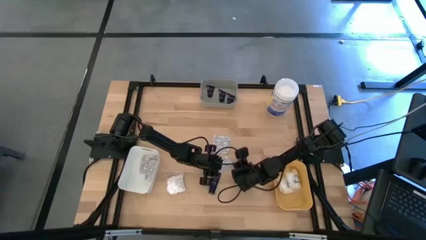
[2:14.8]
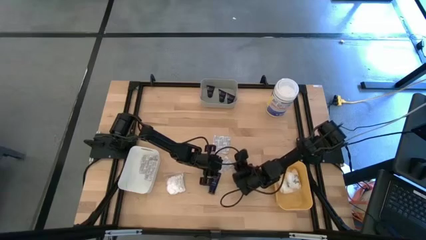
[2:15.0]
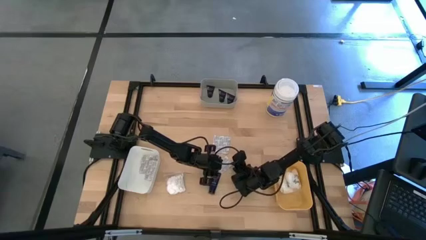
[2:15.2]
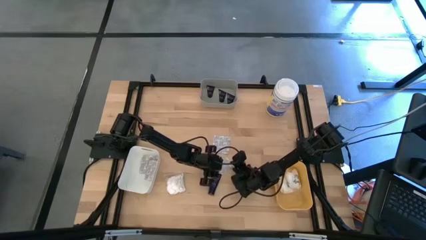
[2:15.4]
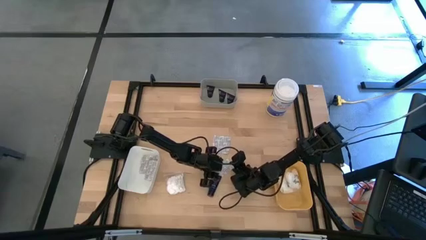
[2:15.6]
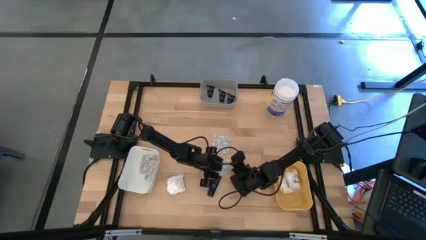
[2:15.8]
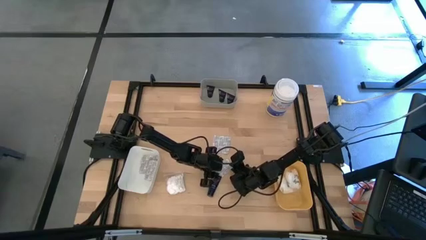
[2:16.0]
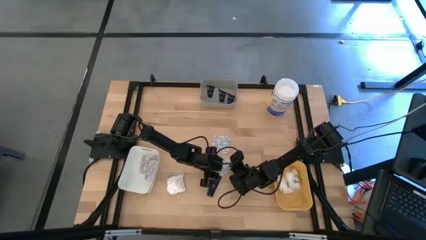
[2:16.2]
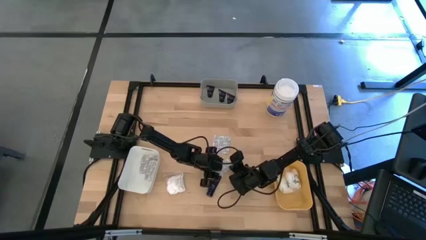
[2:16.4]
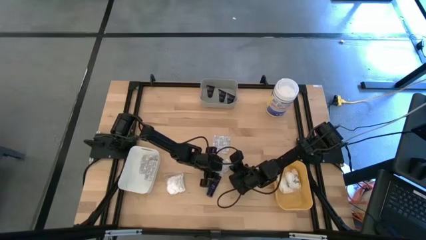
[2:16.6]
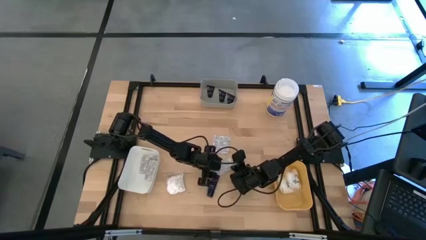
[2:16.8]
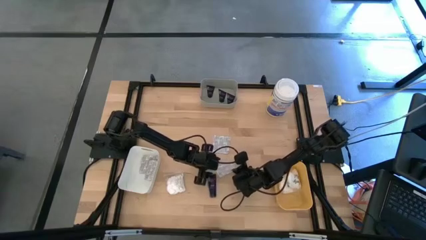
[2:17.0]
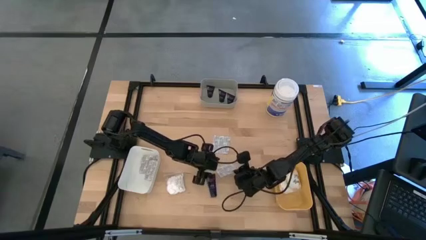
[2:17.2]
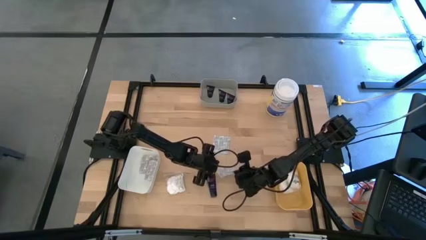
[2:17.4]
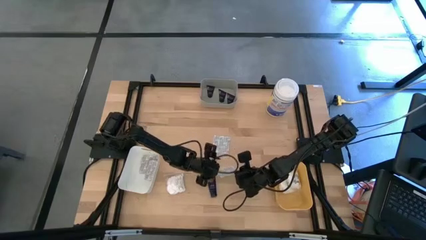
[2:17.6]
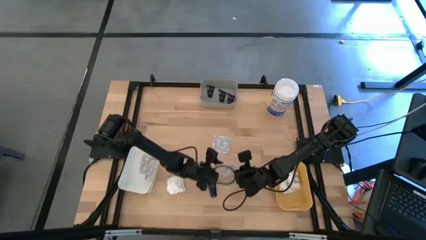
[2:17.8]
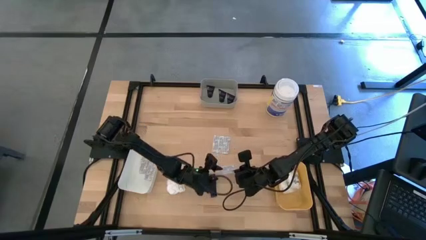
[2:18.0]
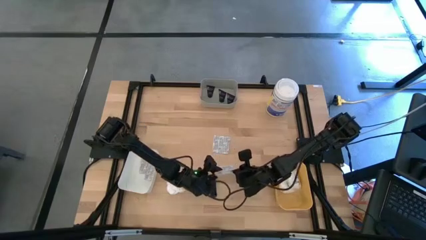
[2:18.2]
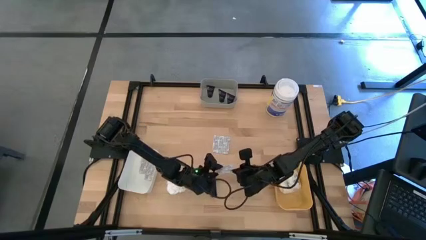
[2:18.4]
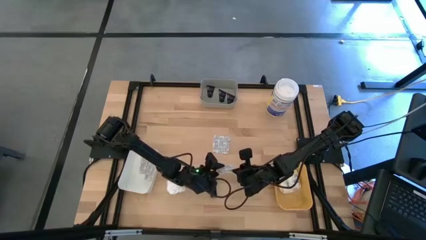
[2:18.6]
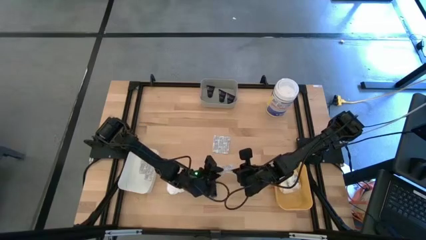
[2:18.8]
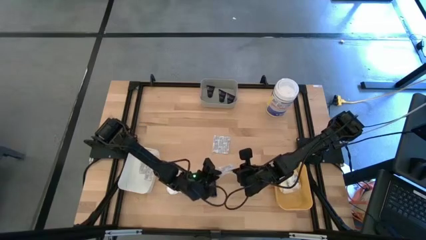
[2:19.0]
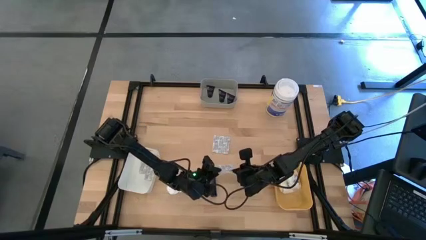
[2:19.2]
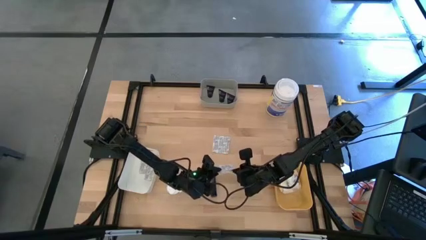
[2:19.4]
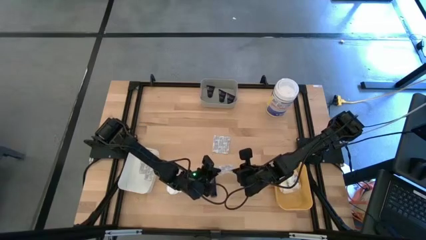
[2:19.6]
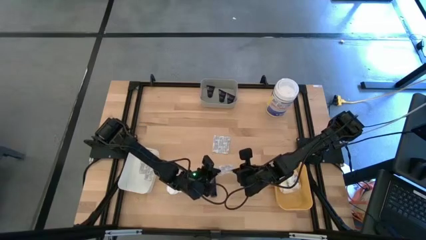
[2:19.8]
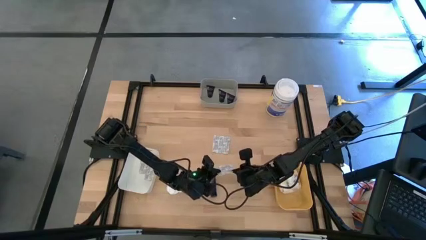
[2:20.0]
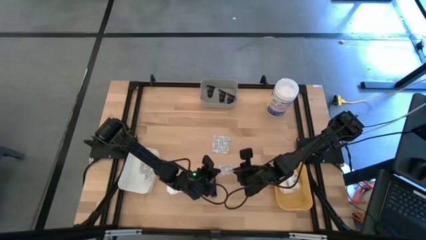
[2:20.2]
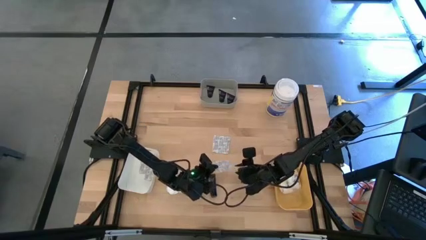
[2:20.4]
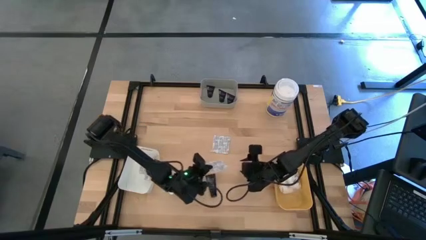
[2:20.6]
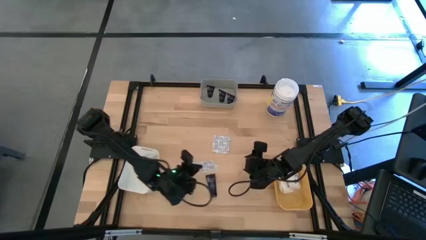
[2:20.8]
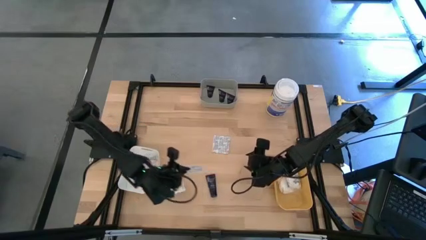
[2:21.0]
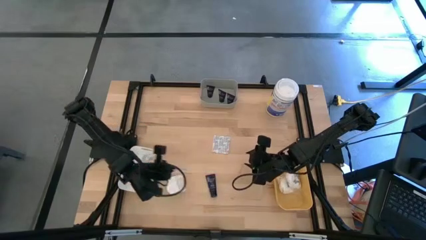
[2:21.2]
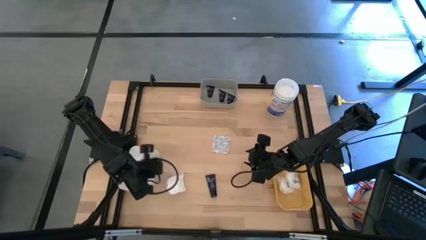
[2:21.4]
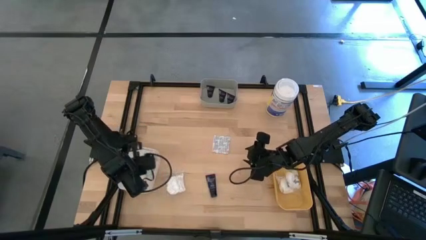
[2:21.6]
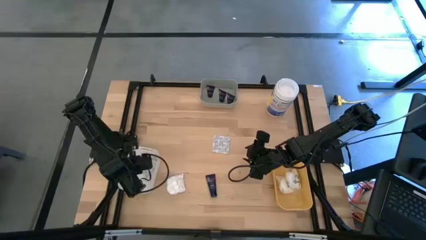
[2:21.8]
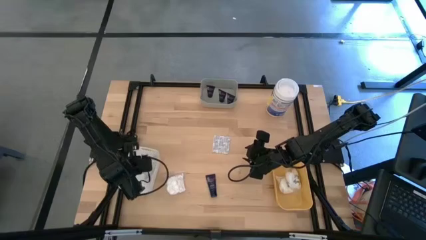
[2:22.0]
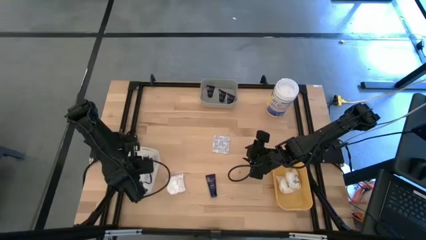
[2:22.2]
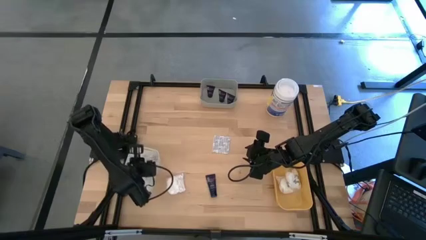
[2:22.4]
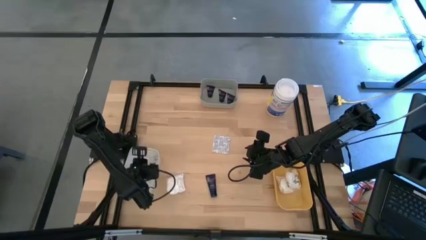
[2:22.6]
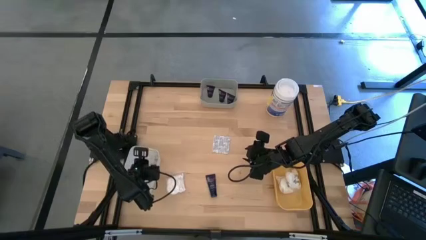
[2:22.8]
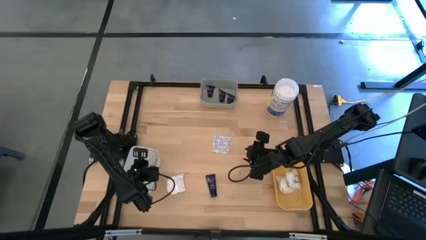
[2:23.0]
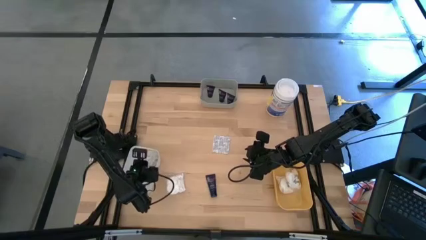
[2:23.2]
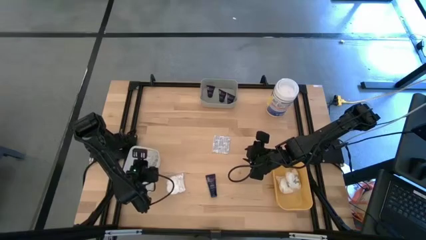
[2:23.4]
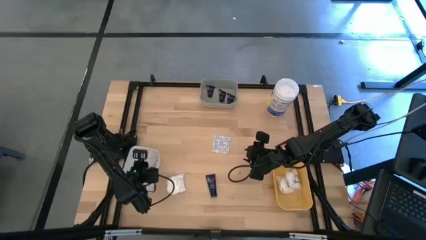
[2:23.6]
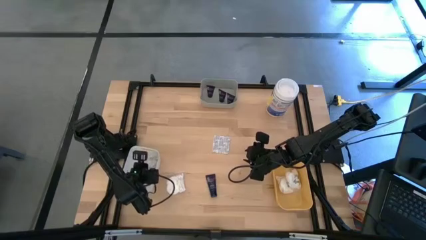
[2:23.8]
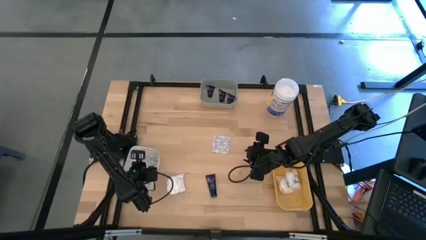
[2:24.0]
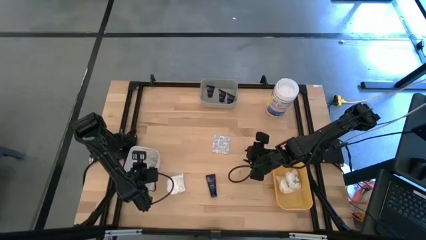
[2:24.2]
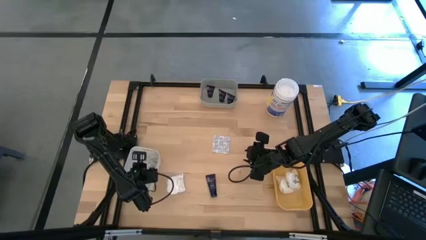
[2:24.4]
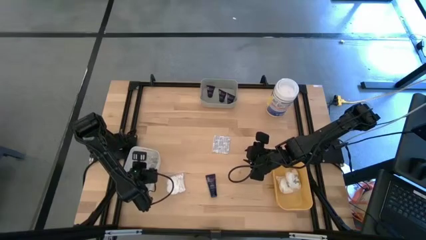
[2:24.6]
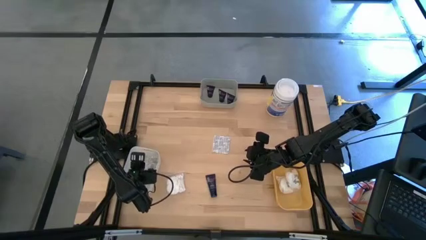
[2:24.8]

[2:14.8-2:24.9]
Task: Pick & Place Travel size toiletries
Put the bandage into the white bin

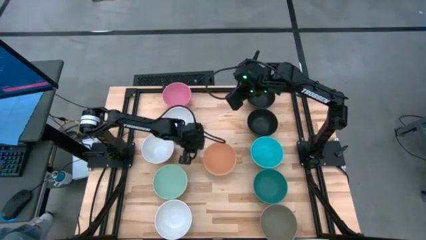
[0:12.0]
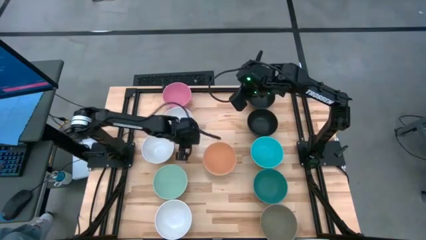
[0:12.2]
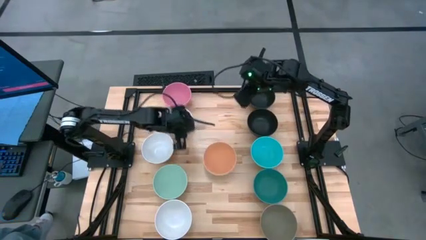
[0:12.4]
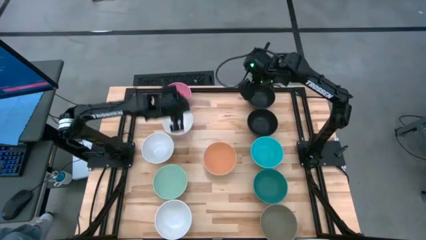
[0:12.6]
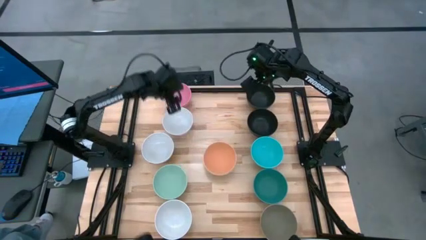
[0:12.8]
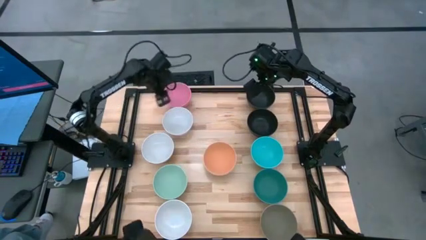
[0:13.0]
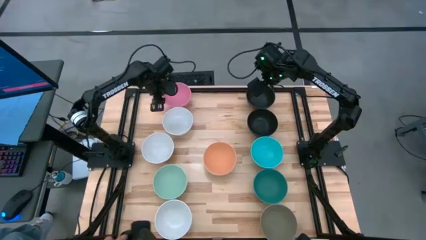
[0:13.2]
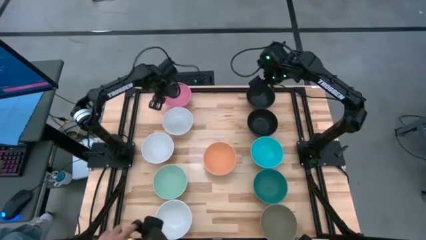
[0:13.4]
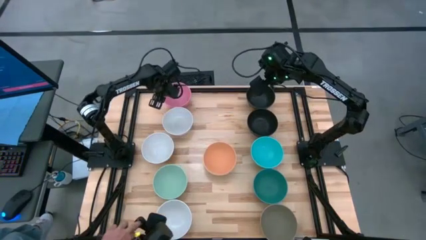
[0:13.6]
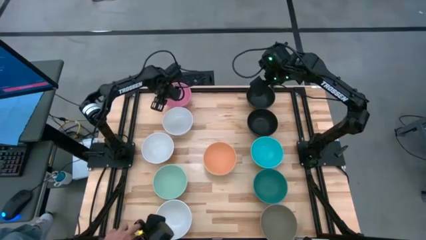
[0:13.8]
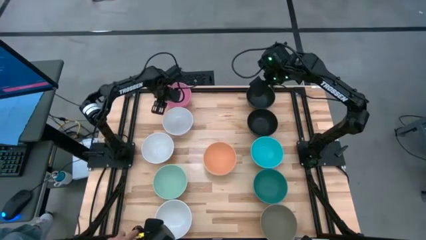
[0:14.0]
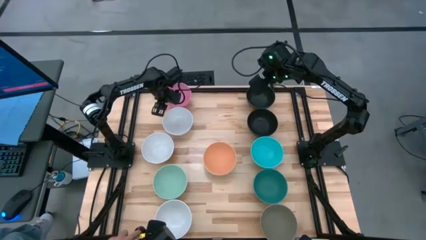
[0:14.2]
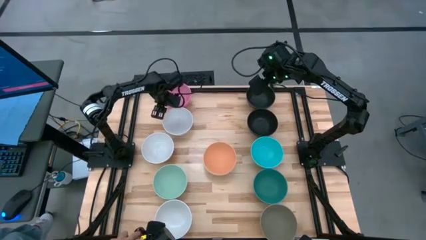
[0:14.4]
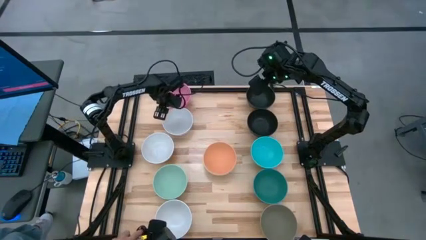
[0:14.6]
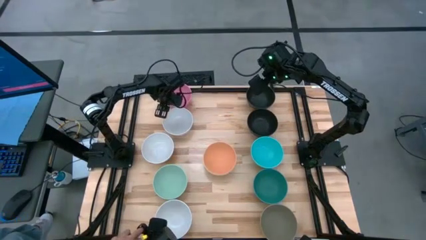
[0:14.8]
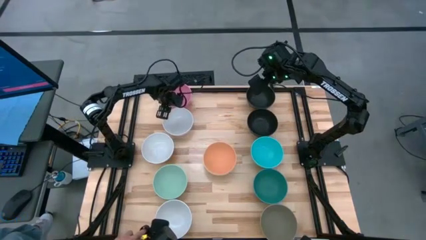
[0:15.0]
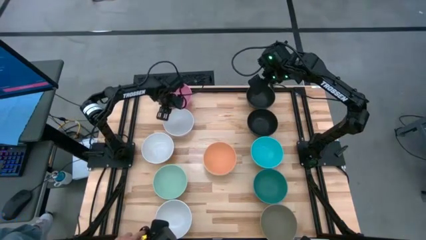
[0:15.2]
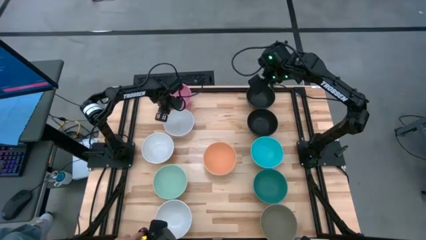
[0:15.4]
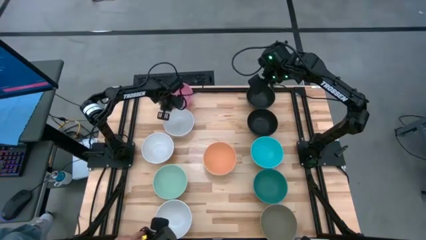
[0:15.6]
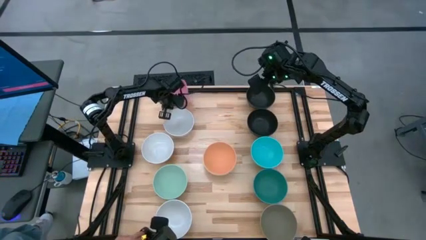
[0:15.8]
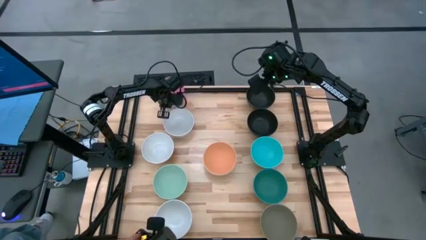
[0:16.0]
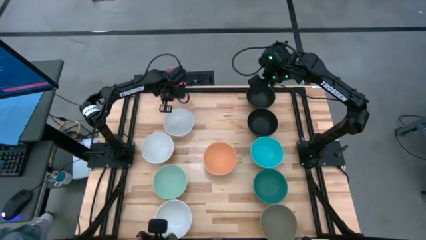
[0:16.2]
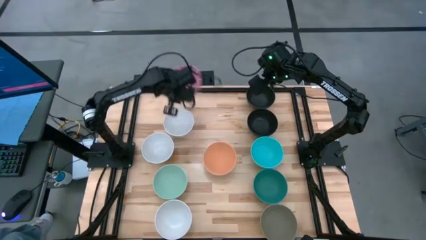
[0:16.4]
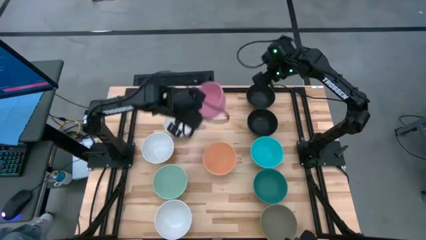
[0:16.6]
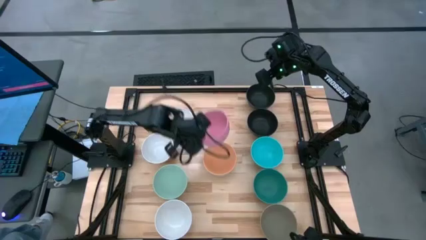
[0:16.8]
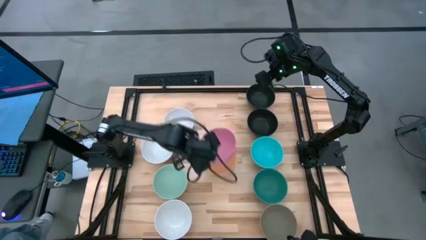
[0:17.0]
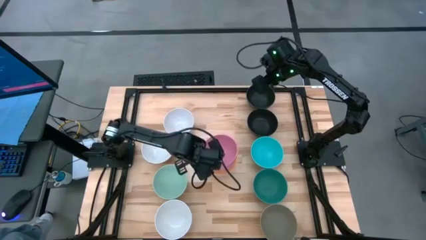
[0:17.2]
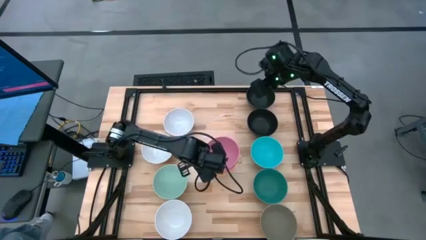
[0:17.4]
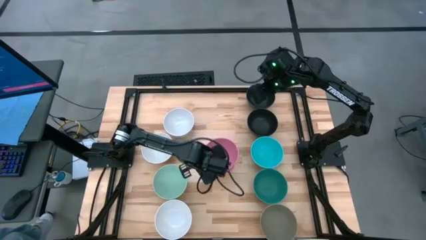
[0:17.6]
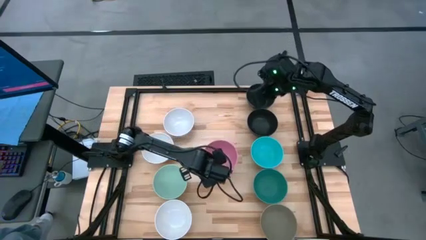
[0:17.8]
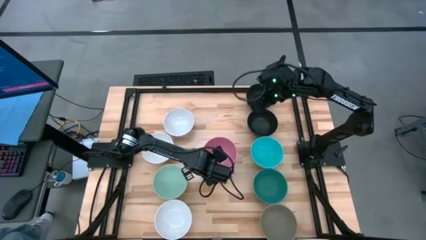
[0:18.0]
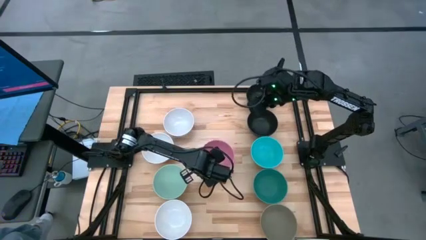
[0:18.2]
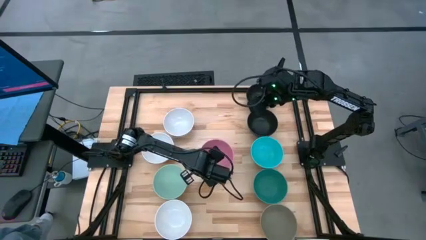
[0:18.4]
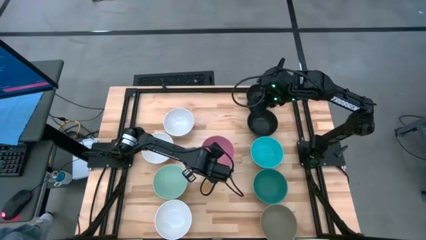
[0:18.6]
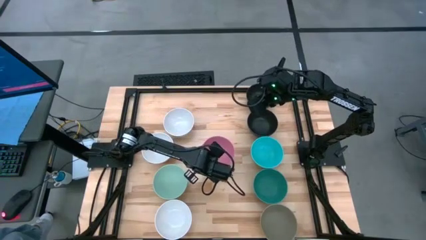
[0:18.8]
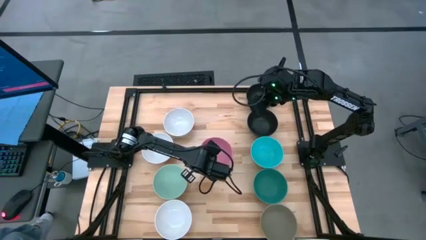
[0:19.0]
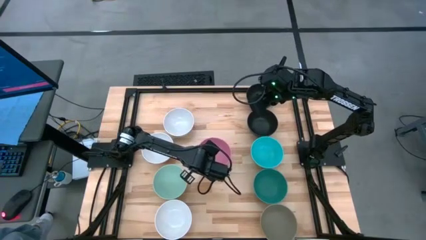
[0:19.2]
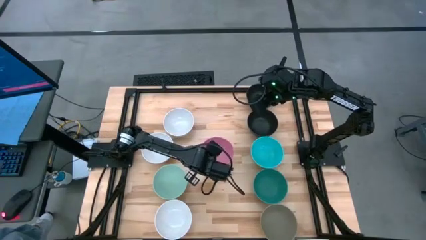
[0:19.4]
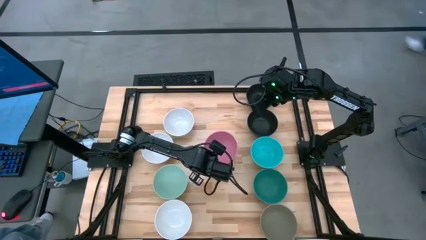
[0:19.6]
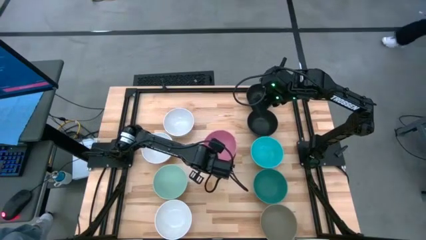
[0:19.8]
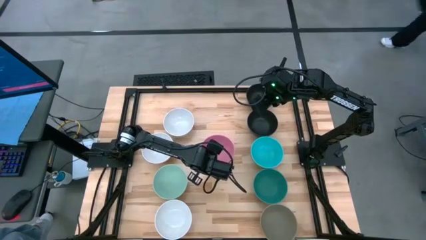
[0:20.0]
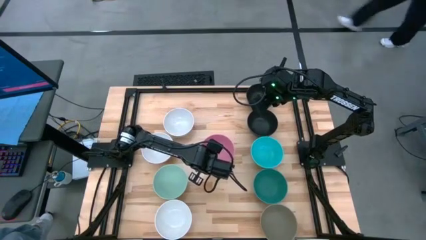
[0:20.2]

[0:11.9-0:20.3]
Task: Nest bowls inside each other
Stack the pink bowl on the orange bowl
